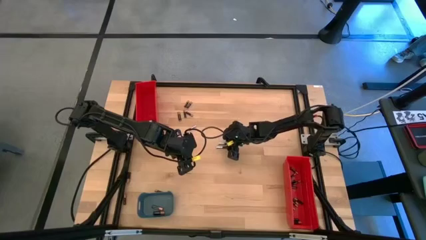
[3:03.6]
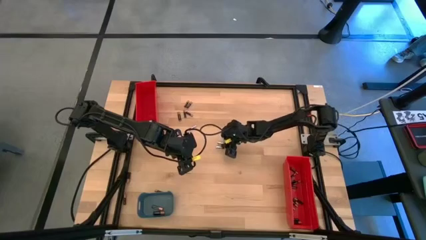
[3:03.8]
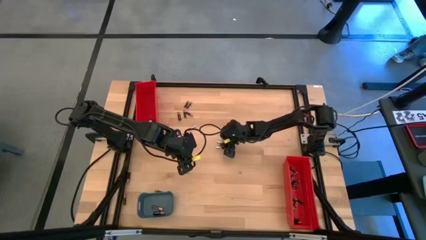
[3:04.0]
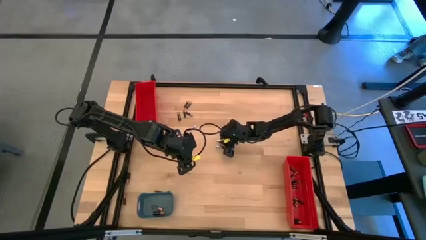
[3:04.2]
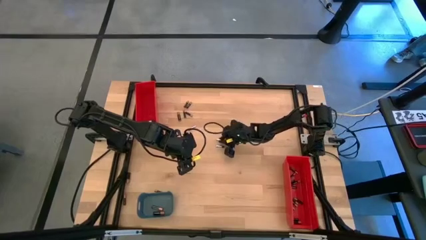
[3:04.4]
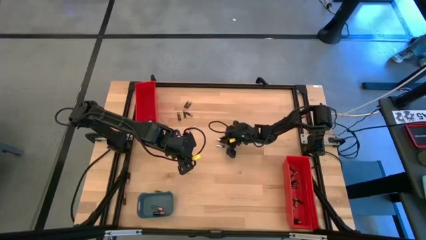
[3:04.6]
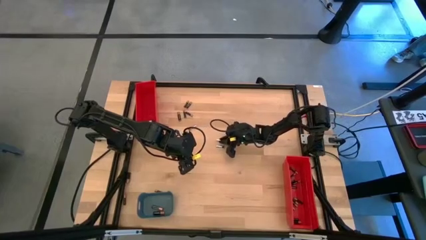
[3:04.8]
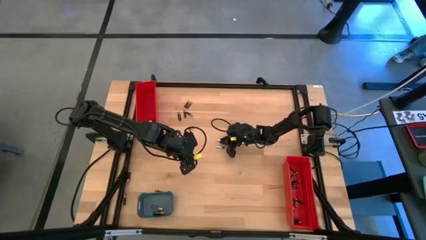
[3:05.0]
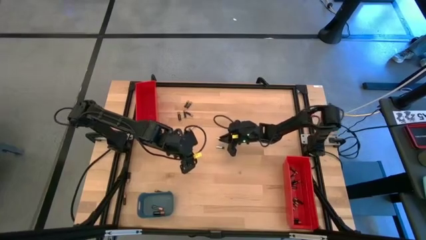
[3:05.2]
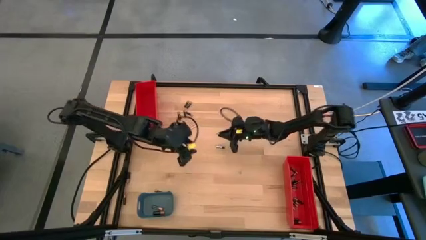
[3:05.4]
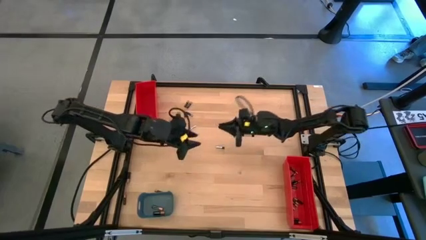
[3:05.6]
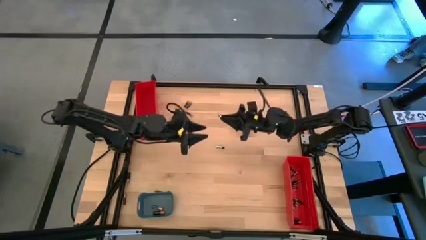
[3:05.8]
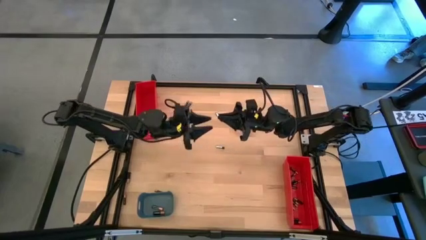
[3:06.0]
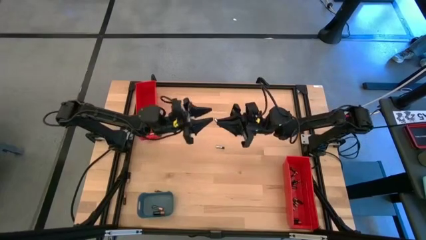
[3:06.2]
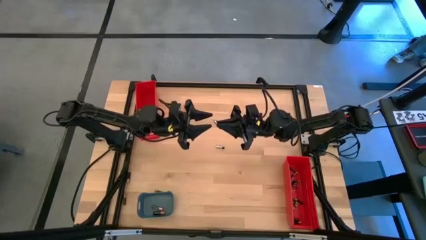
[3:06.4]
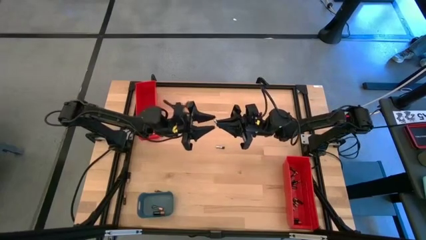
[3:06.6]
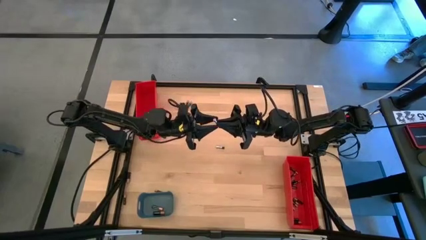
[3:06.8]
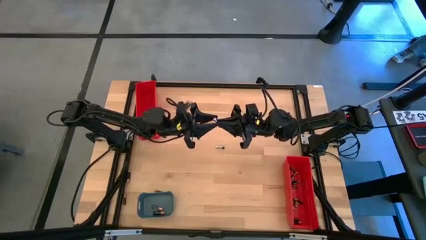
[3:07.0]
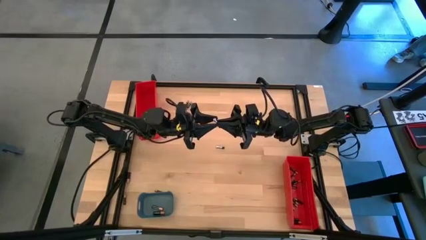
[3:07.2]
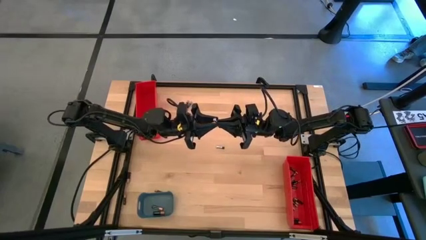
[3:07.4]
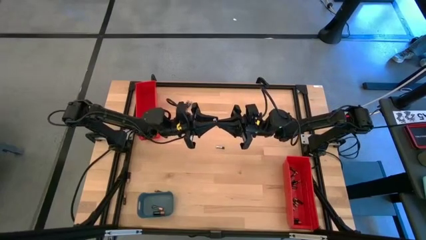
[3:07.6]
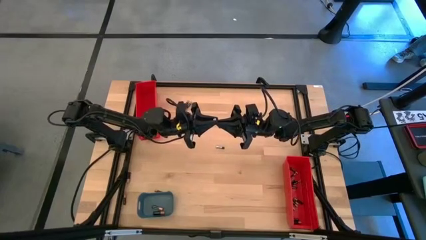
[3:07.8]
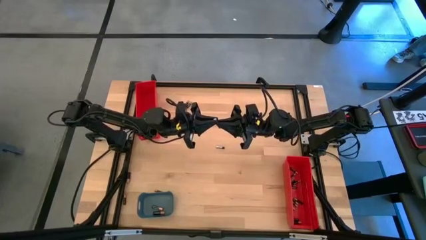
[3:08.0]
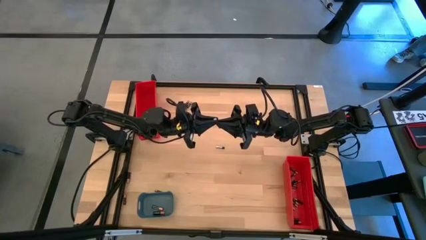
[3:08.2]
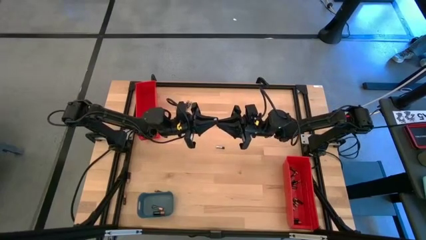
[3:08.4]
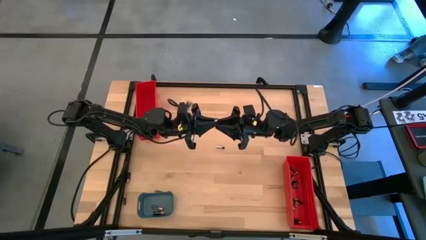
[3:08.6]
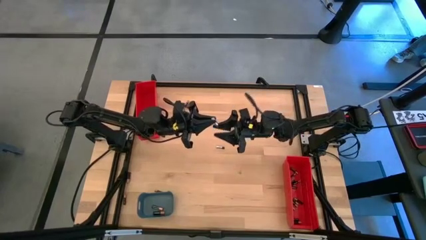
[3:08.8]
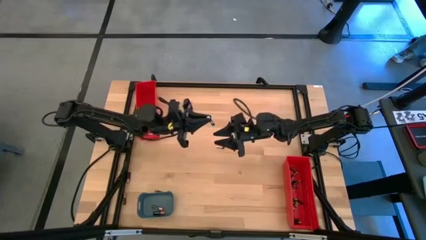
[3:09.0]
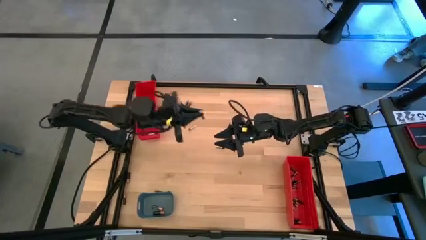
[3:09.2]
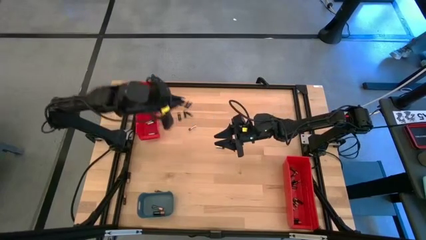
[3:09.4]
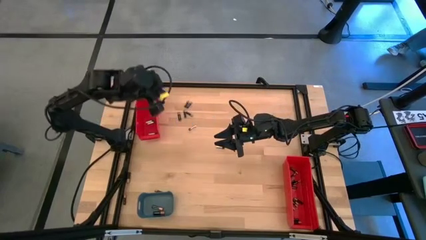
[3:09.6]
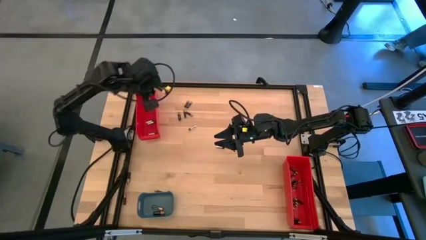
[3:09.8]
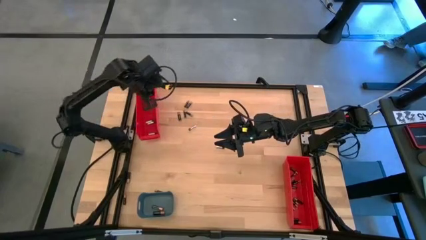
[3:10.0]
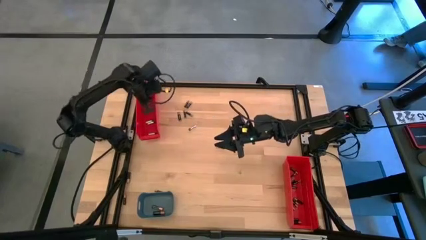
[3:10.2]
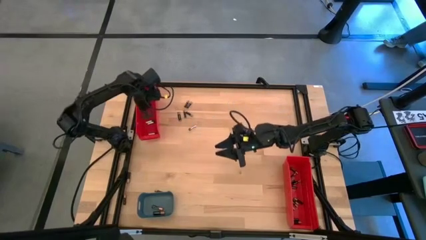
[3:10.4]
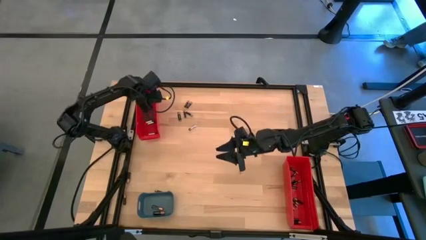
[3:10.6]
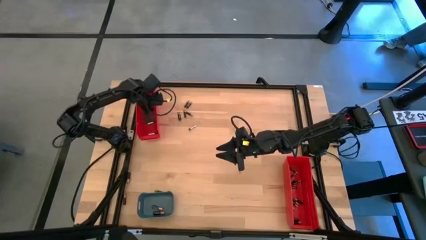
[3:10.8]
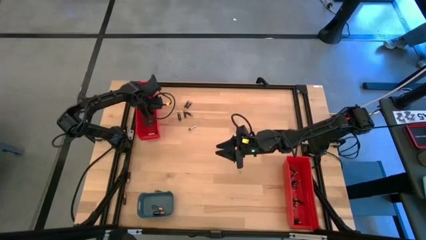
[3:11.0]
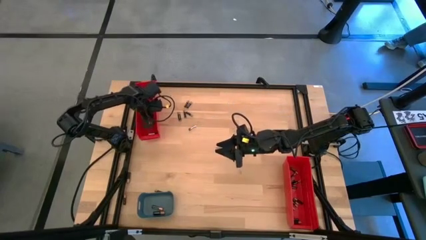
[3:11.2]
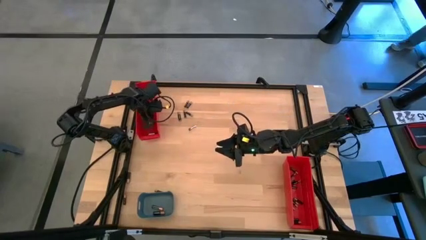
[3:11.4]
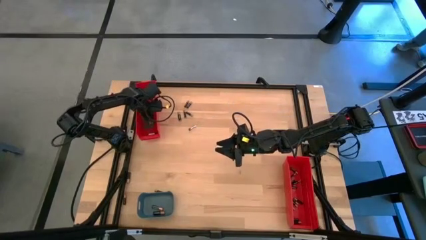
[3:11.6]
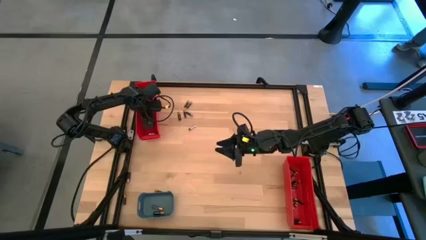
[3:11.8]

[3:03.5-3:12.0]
Task: Sort batteries
Put the silver battery into the top red bin

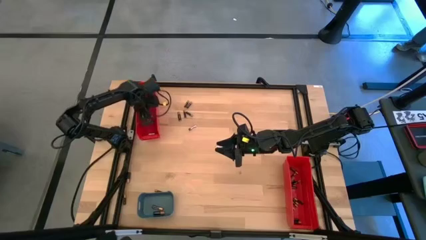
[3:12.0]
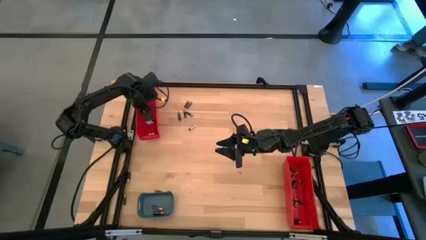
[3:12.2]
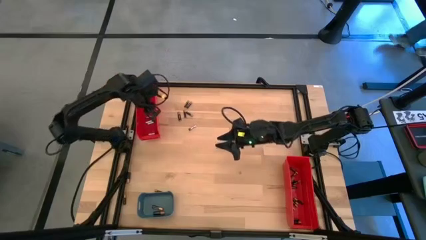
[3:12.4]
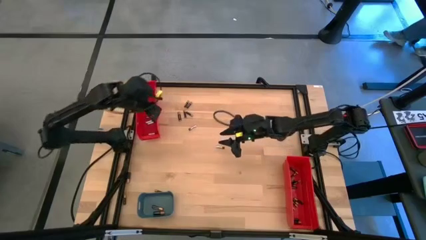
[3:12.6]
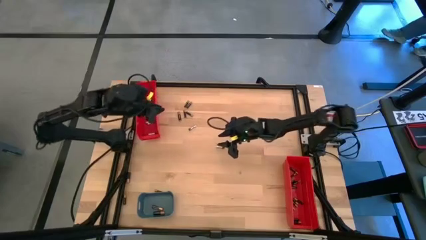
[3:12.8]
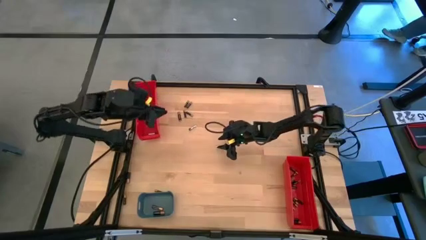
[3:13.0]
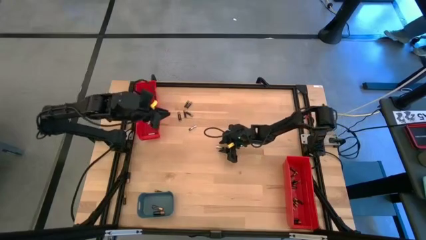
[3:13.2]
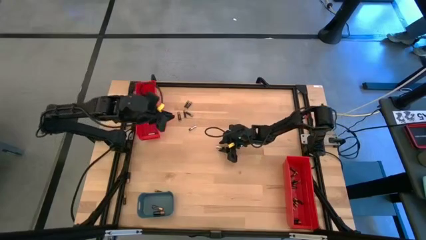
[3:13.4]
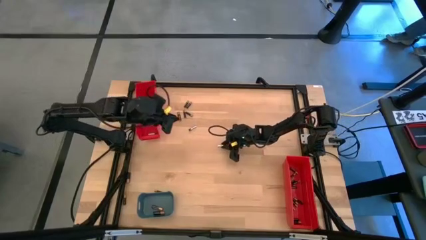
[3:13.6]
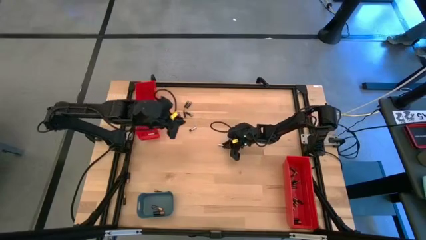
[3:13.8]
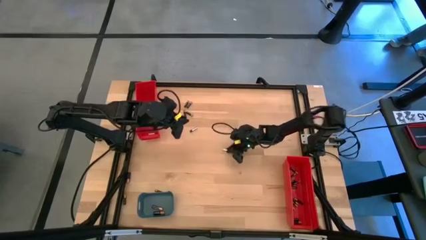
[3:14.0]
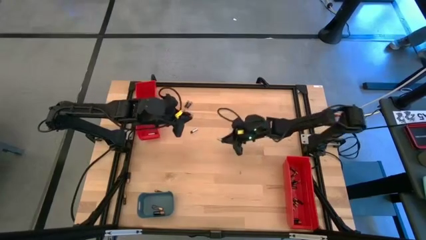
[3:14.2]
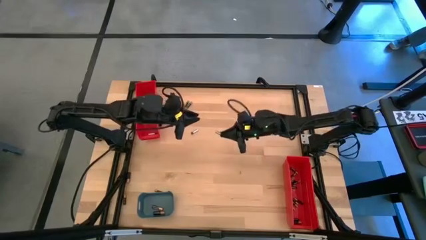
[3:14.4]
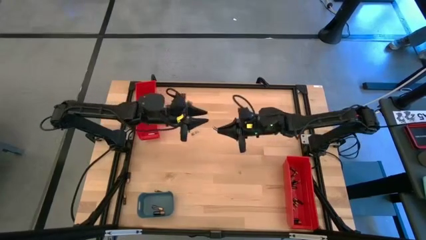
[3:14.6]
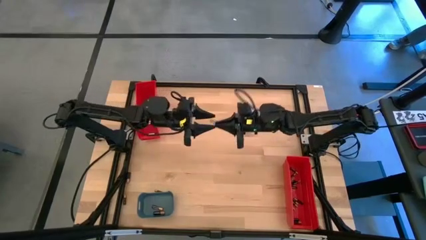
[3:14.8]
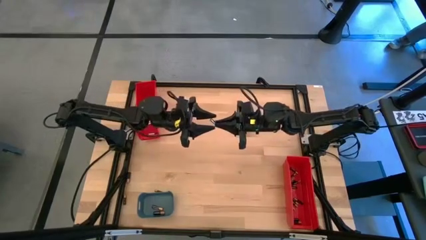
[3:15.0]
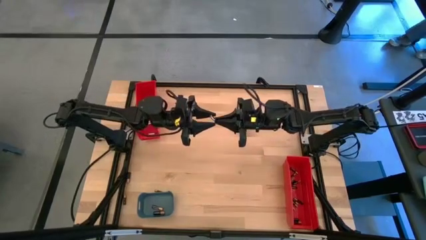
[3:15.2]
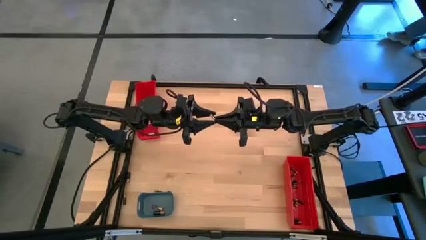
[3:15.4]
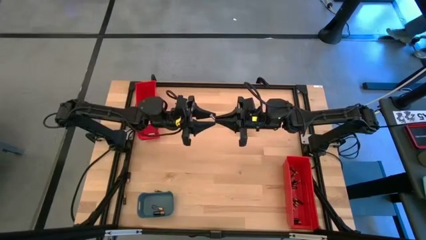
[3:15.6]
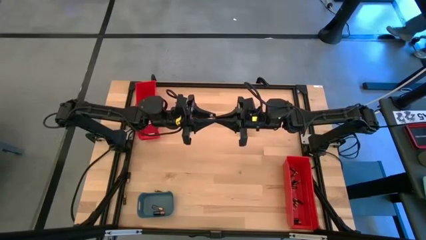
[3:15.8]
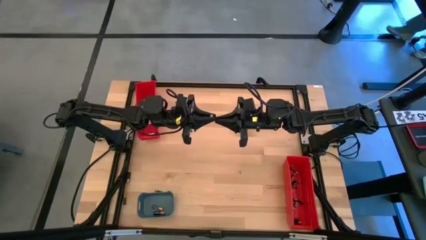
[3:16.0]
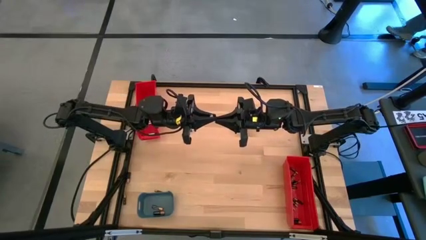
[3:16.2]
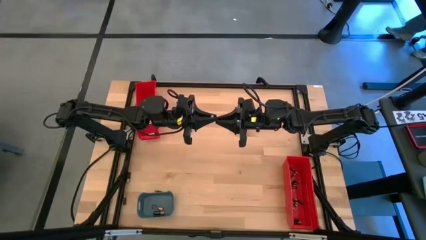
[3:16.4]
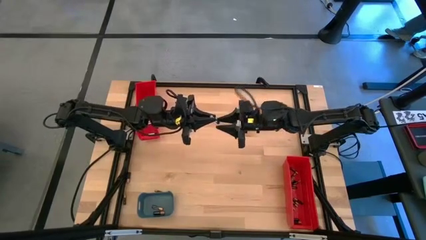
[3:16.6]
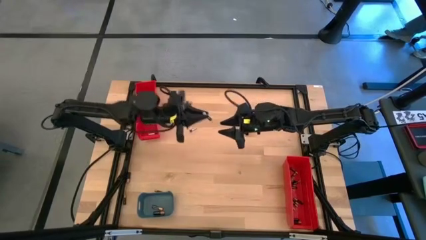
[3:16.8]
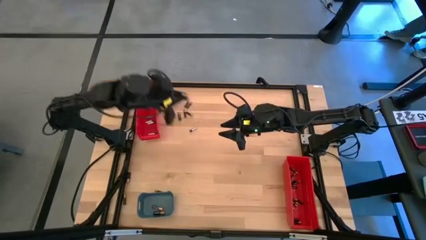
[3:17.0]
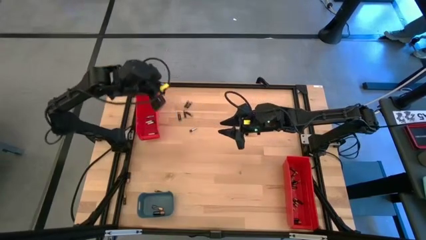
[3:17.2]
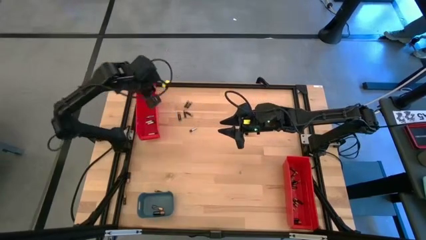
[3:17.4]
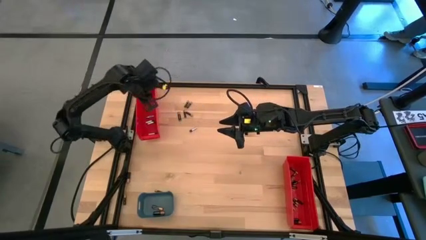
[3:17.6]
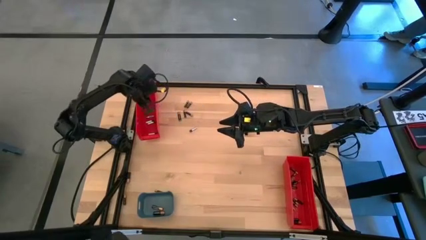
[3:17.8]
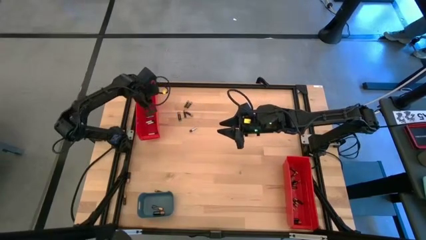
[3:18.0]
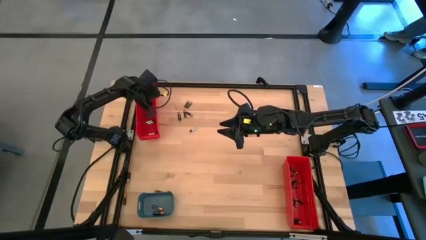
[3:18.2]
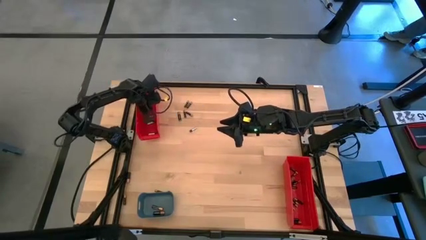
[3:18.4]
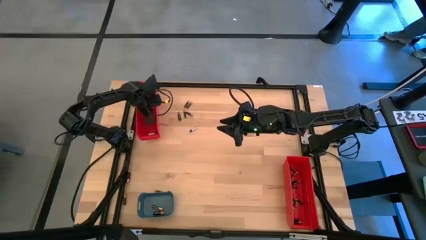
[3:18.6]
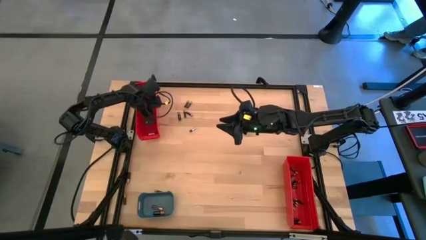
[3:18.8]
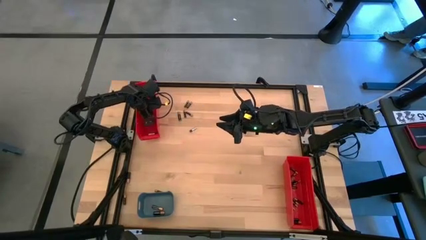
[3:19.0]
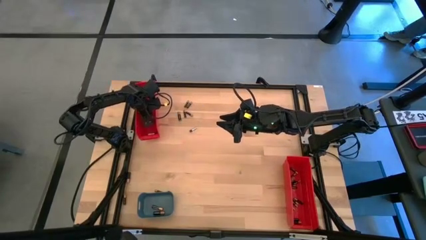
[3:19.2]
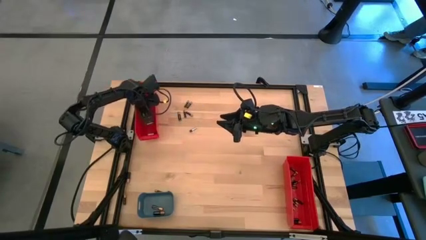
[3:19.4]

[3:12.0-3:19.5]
Put the silver battery into the top red bin
